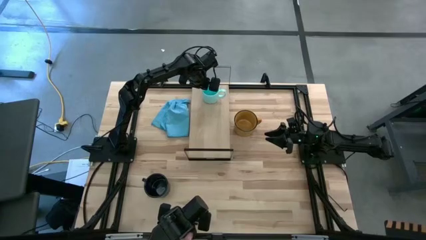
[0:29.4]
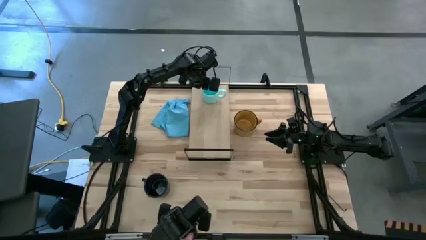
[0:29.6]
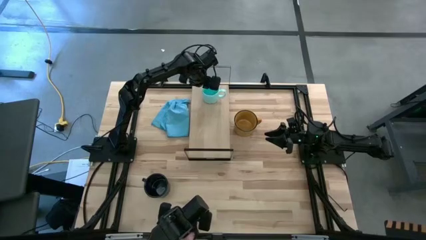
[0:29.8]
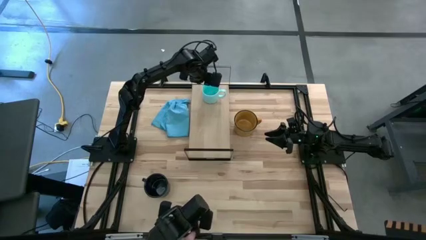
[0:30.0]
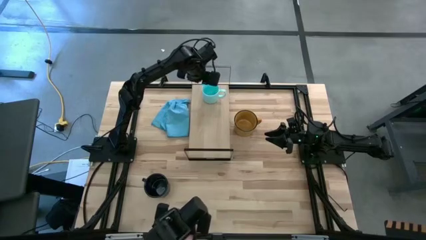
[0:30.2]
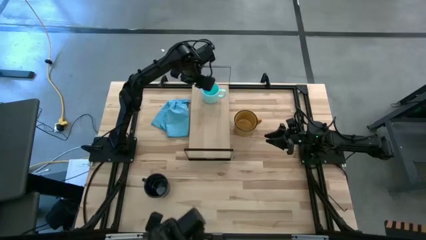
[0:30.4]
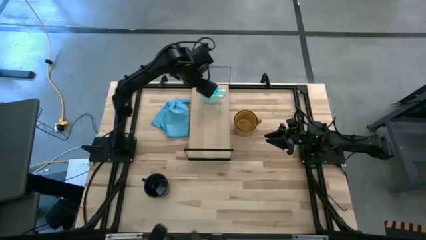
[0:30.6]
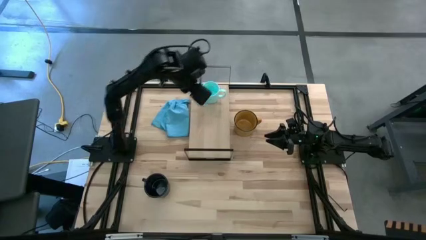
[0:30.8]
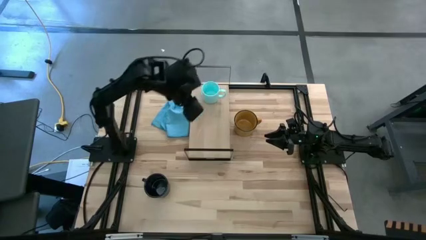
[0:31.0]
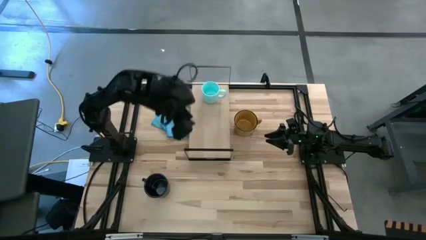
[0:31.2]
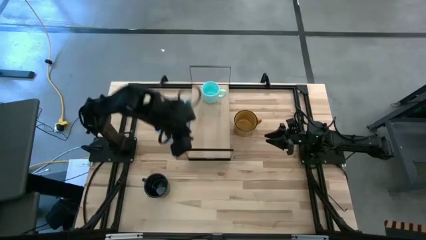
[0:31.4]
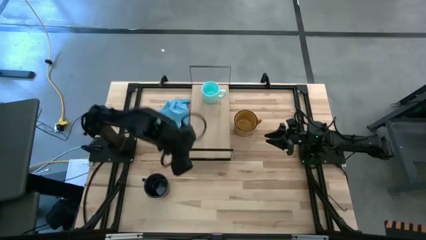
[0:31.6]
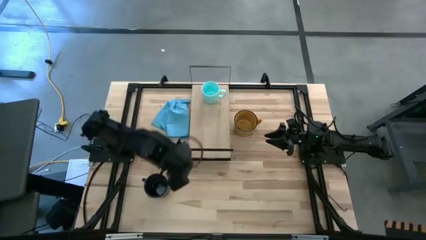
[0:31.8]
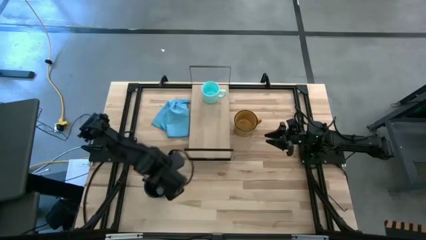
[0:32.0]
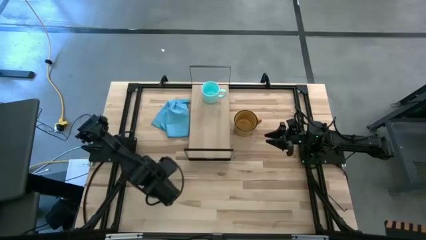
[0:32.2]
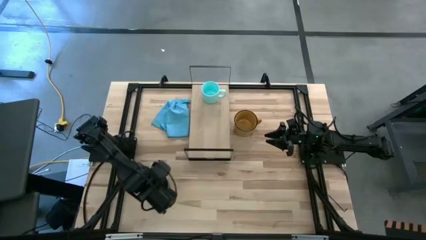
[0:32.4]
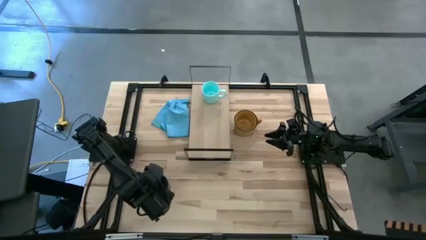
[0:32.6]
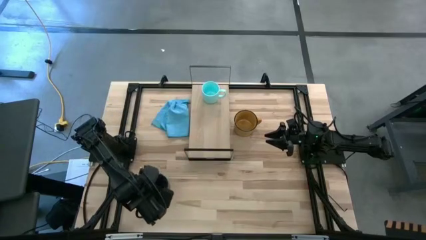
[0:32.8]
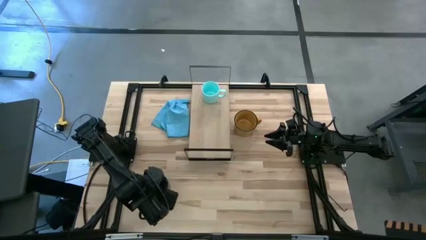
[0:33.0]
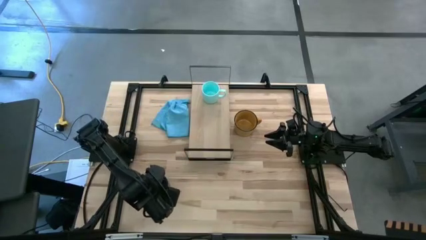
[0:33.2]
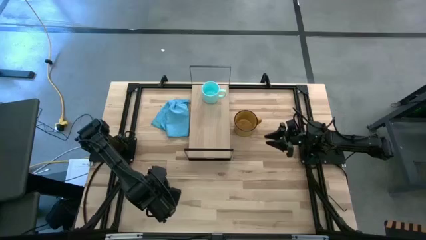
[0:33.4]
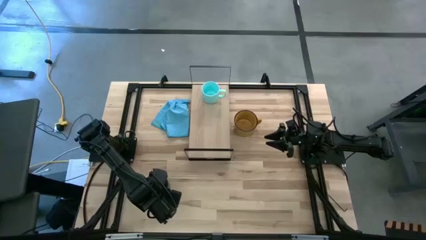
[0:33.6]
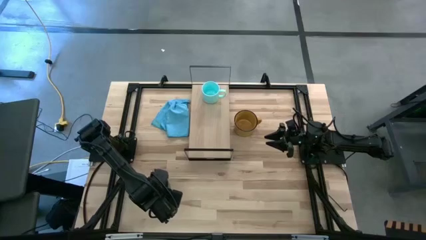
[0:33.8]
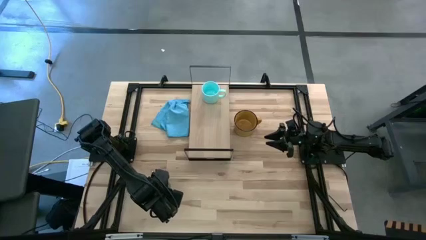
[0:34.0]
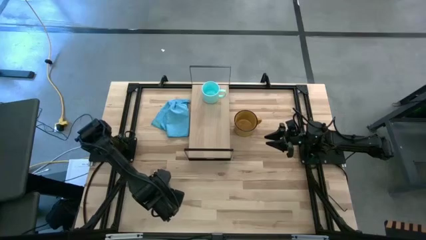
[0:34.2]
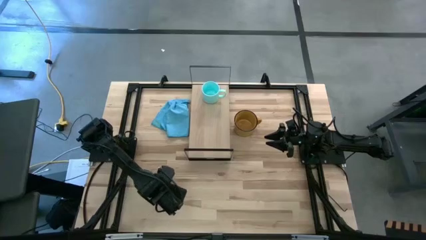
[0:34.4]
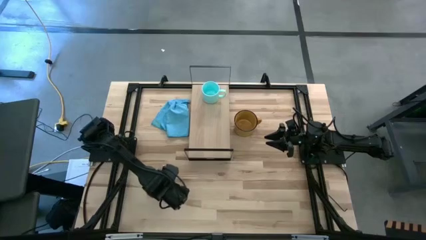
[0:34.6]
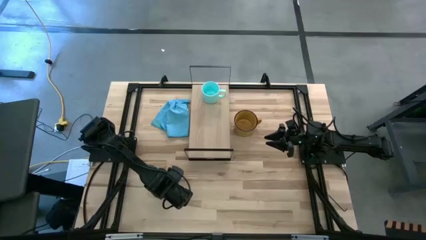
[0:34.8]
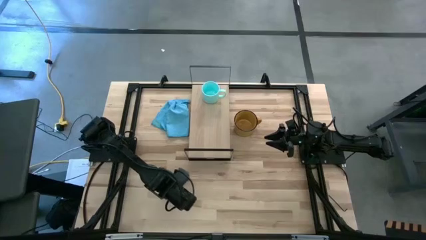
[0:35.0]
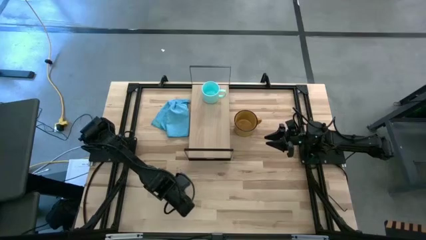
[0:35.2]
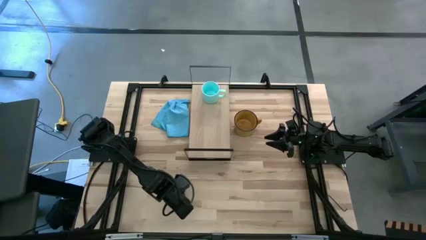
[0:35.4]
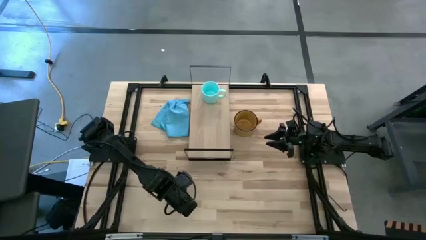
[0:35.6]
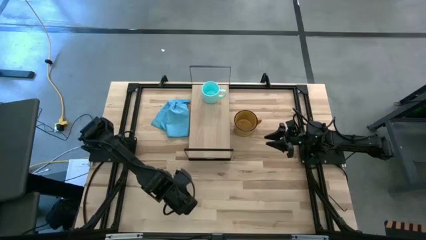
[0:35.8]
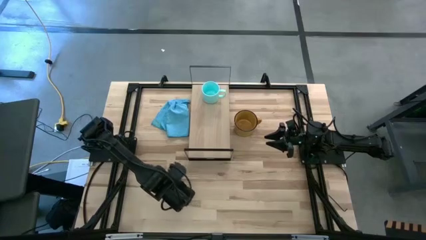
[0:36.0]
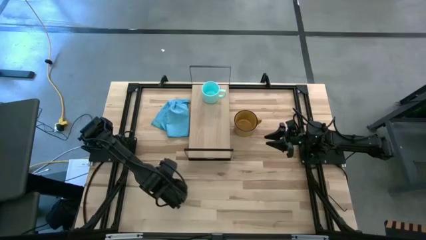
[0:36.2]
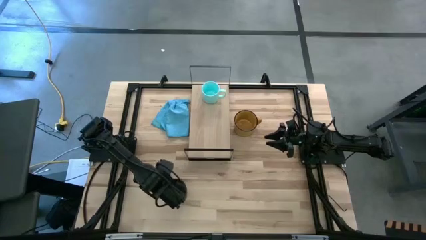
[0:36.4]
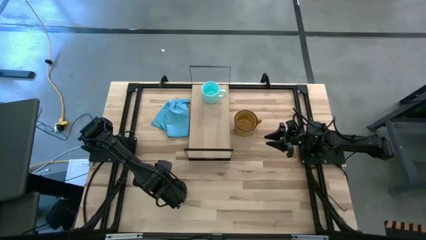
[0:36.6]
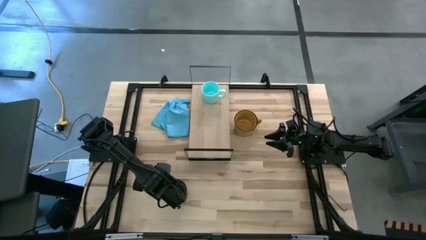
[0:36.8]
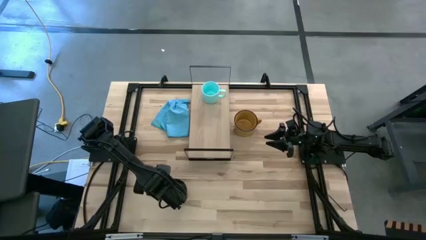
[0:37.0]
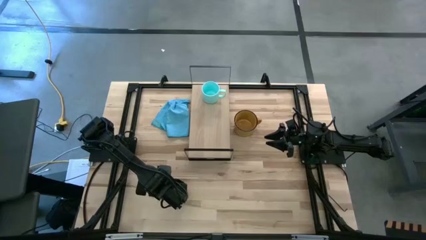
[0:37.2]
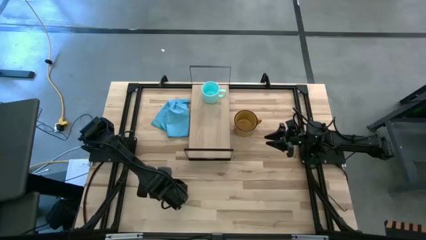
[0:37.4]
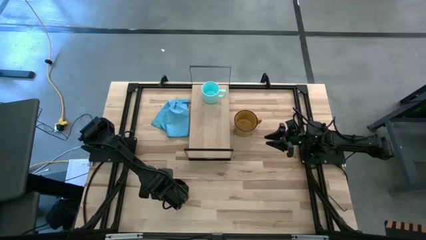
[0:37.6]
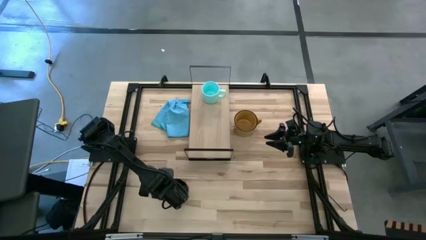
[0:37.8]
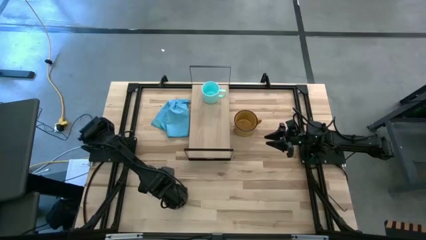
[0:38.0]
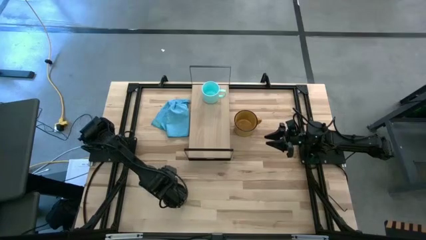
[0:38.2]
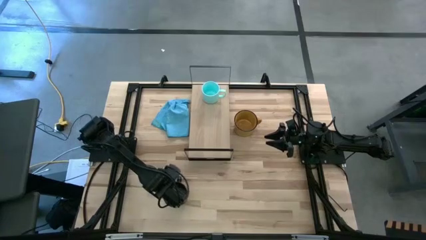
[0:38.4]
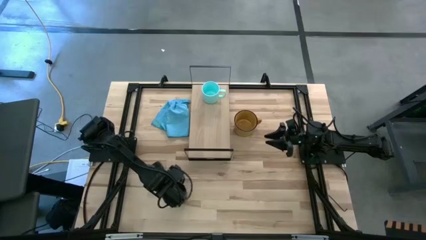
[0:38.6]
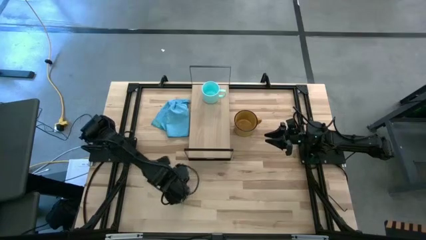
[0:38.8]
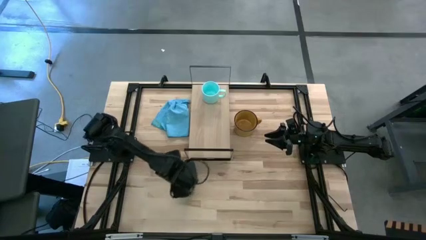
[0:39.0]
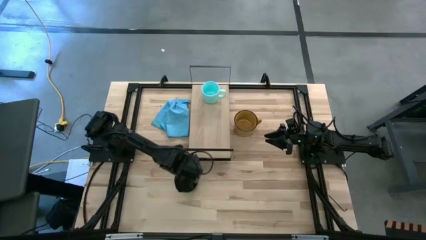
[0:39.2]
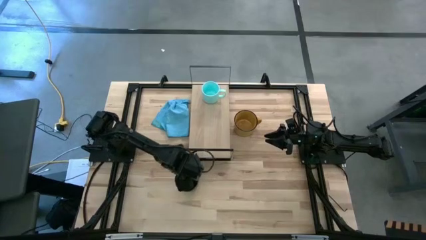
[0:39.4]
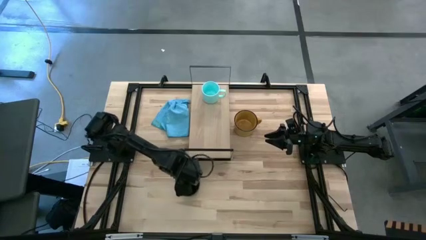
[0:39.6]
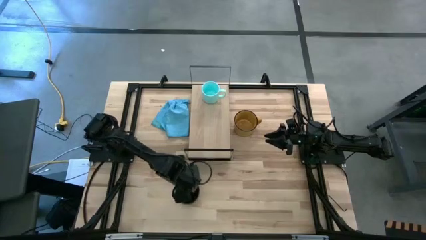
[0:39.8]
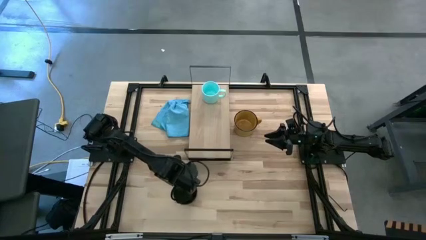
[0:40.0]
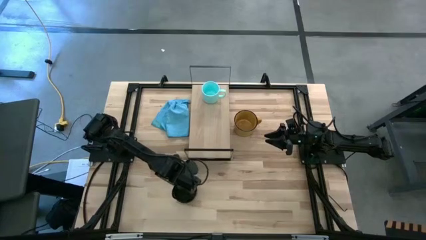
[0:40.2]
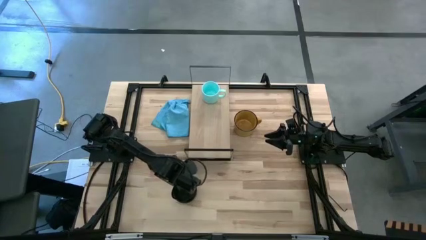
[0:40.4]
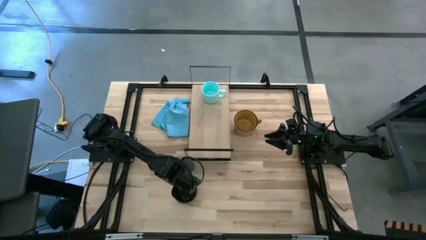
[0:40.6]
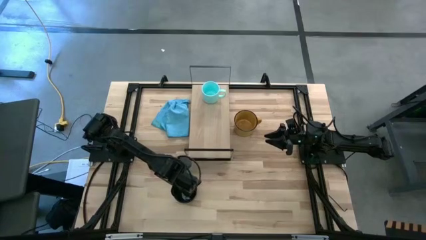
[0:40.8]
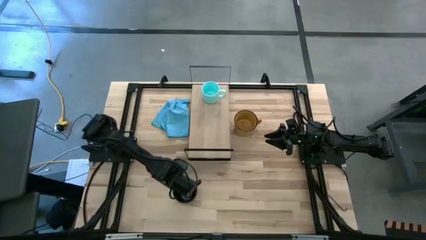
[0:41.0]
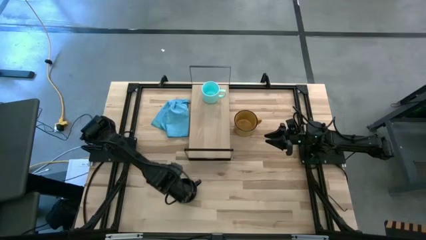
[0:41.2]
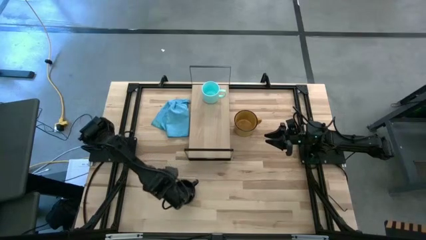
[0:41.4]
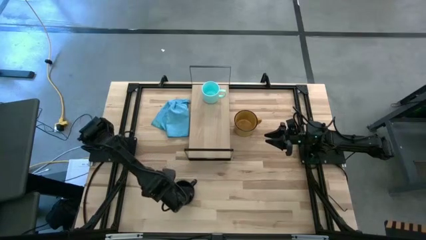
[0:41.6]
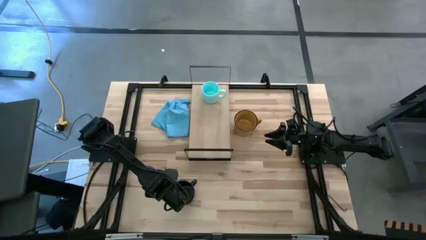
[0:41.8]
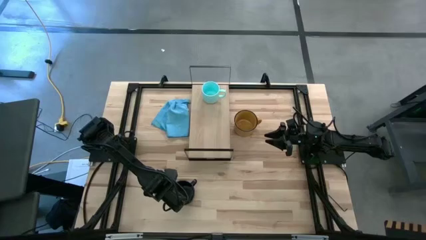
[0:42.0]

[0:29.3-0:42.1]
Task: Stack small to large cups/mugs on shelf
Put the dark blue mug on the shelf

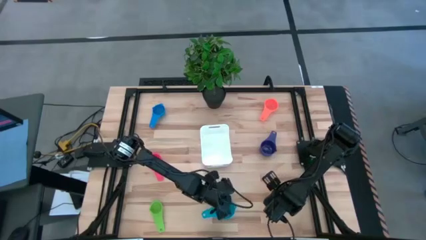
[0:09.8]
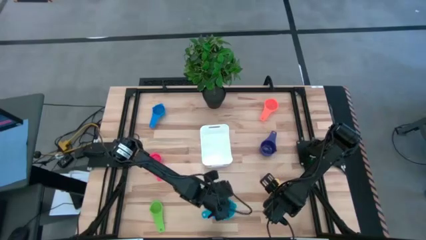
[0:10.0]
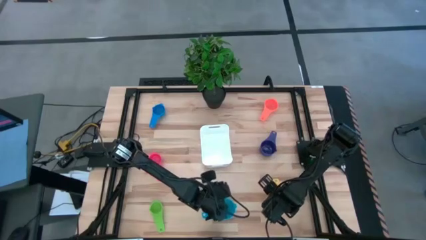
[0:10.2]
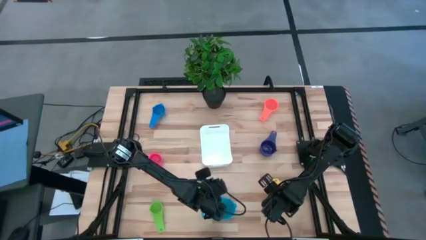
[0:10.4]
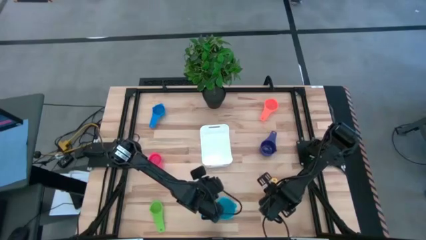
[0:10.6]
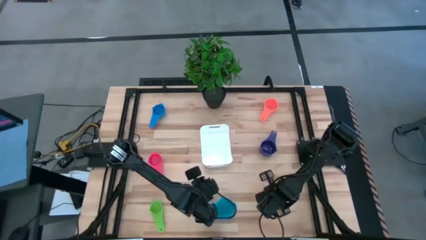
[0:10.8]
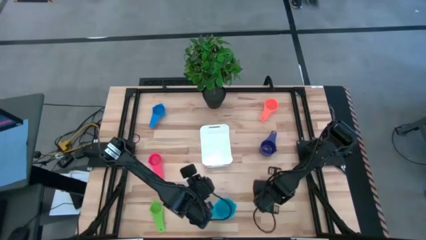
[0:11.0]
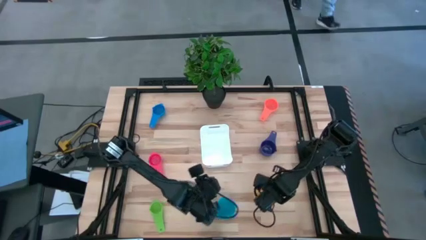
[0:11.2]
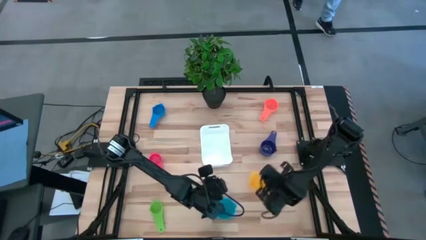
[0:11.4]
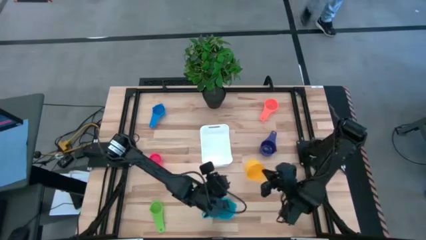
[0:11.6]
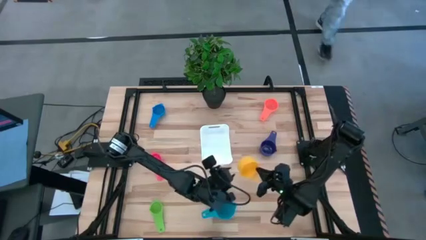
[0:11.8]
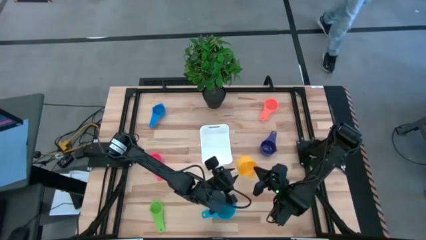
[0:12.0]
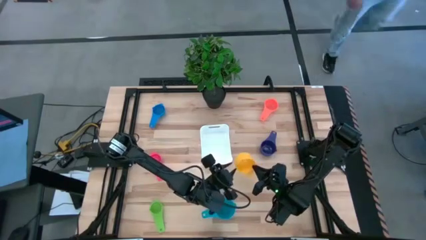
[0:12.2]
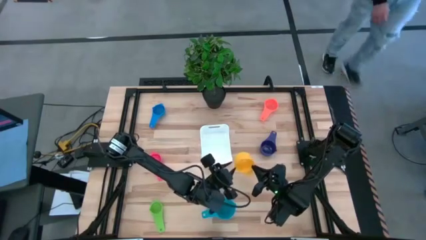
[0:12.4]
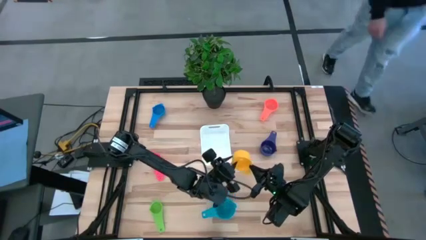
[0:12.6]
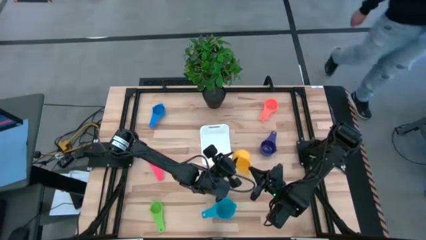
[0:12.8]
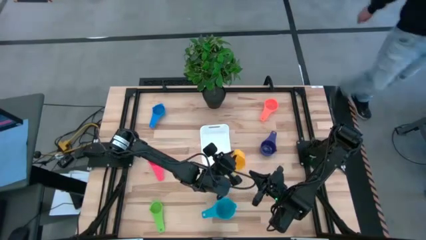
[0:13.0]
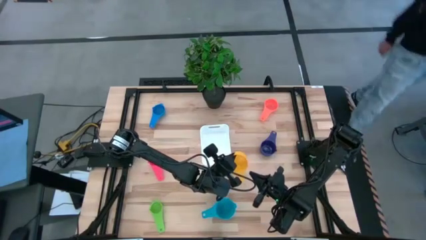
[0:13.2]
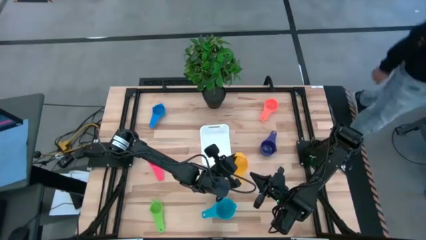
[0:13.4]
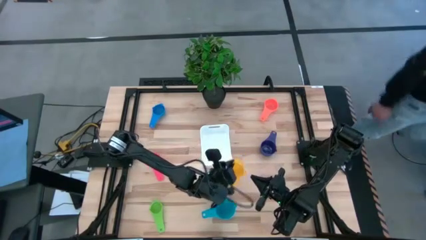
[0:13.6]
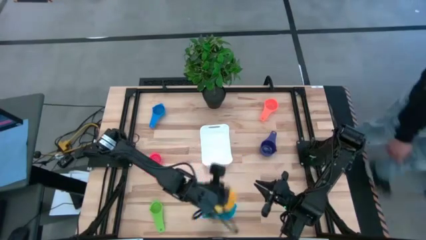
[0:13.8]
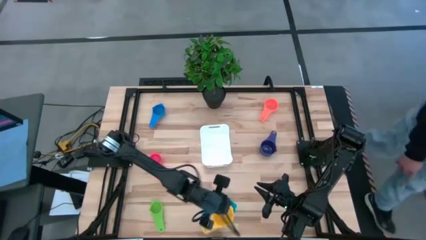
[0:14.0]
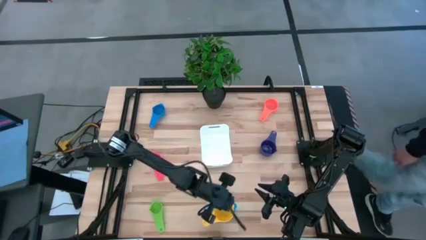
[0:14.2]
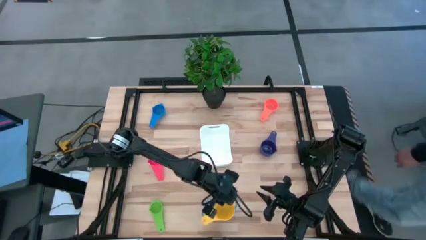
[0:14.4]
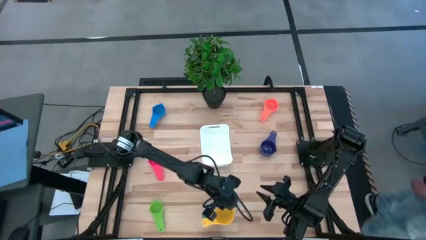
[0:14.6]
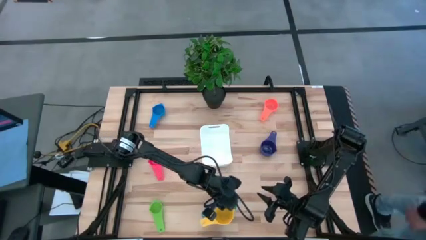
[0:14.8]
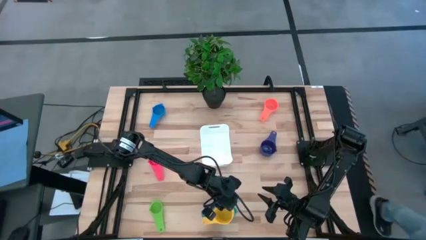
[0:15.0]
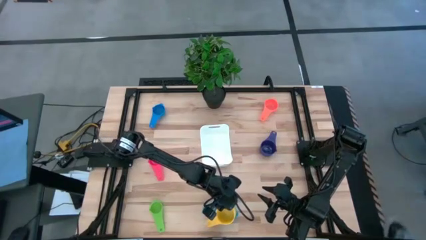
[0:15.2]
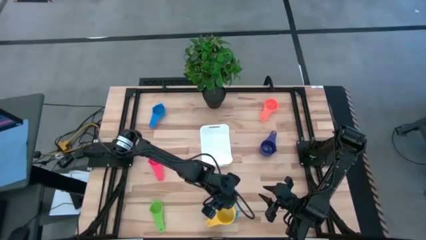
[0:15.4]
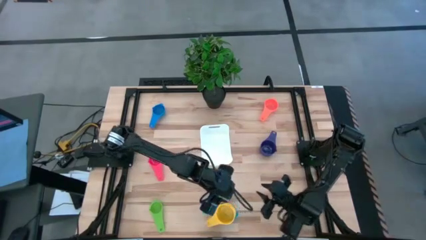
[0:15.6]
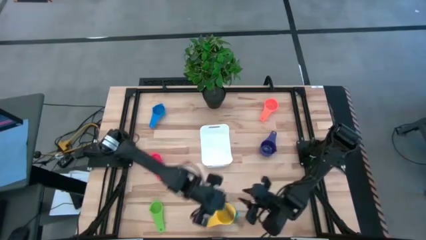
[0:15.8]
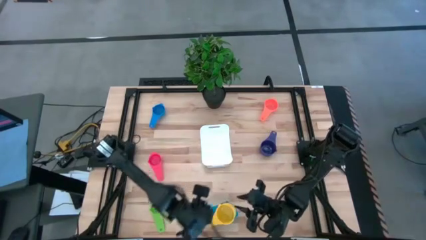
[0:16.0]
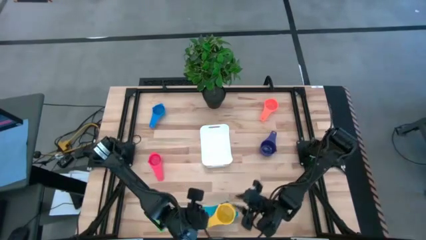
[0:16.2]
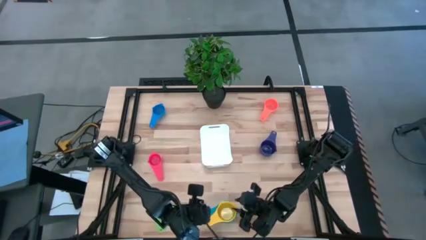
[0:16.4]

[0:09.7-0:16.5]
Task: Nest measuring cups in basket
Stack the yellow measuring cup on the top of the light blue measuring cup
